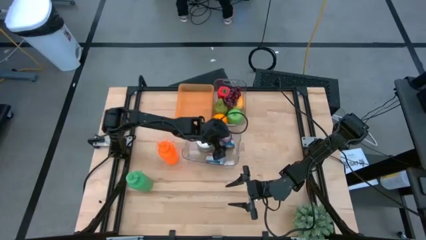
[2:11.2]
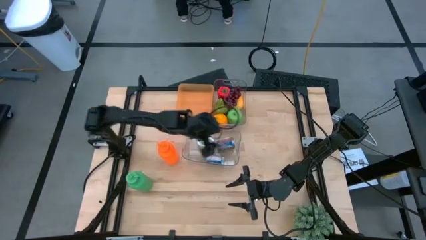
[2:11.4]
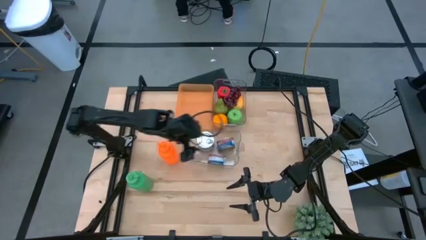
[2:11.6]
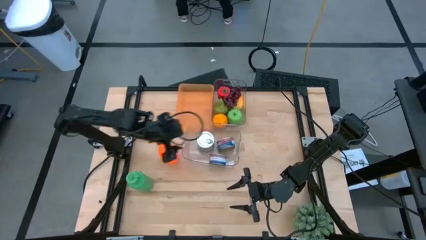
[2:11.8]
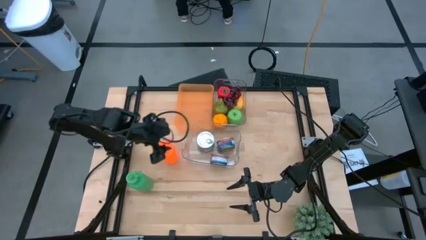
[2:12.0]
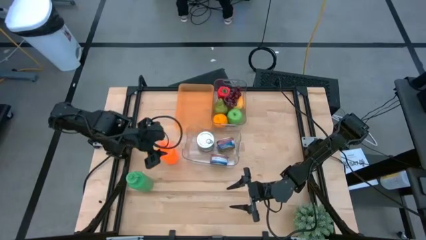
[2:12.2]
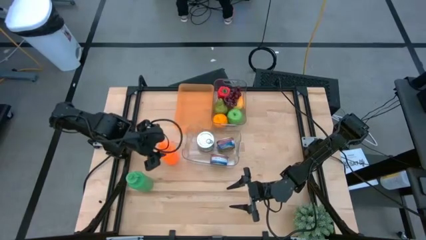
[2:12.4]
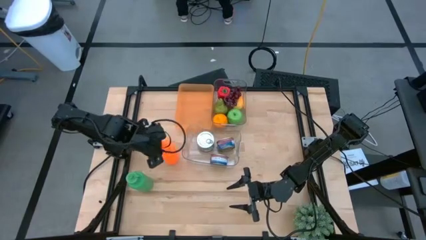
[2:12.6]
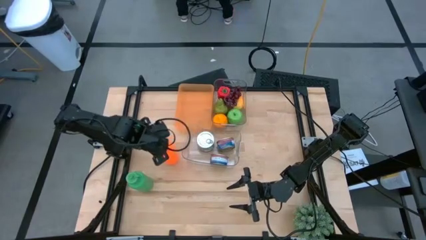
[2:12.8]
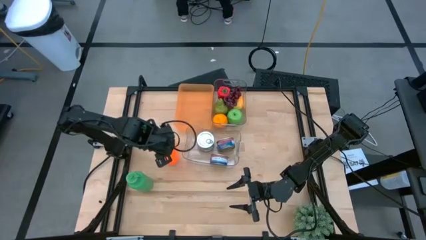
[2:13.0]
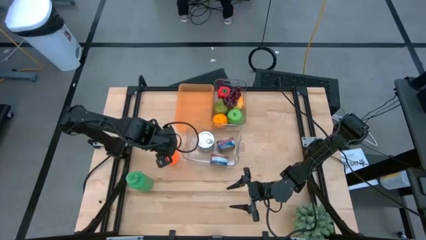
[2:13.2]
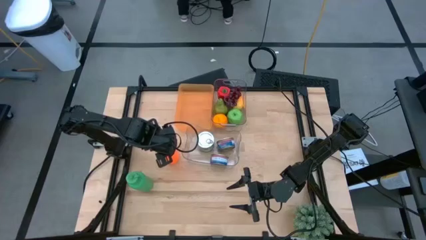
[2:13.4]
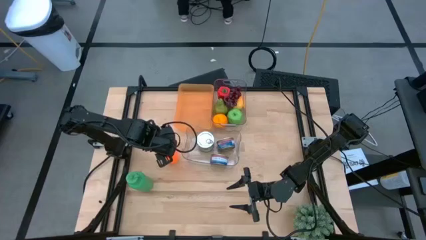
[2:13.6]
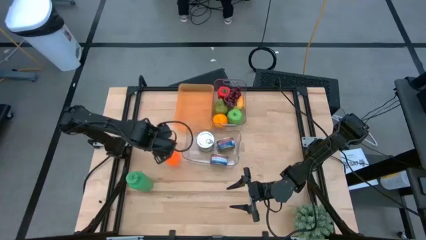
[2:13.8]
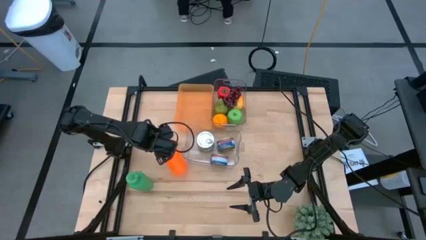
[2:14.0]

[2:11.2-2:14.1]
Task: Pick & Place Food Item
Put the orange water bottle into the orange bin

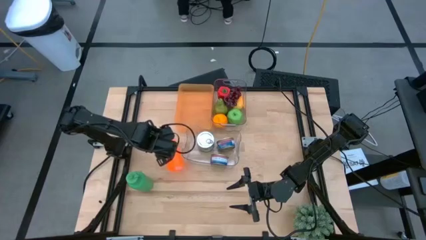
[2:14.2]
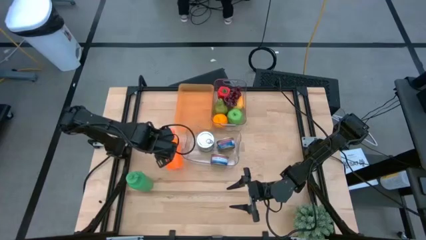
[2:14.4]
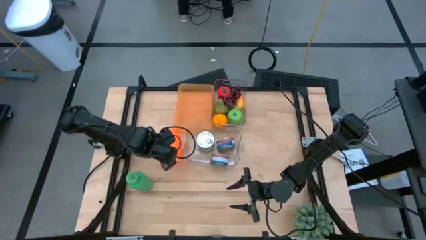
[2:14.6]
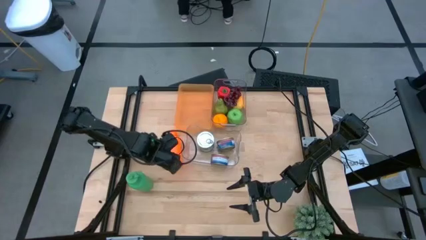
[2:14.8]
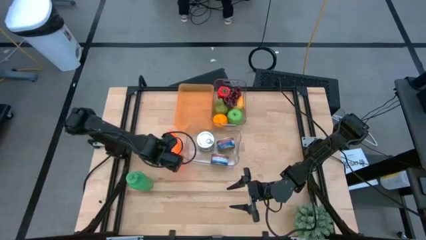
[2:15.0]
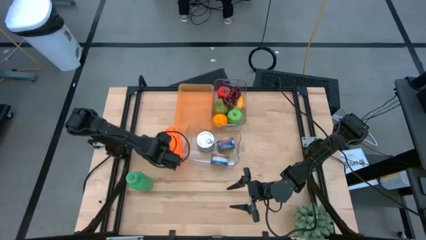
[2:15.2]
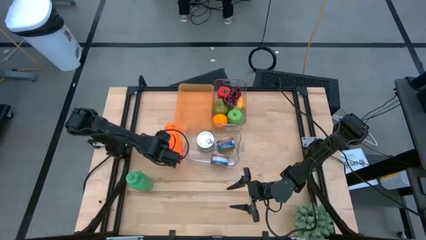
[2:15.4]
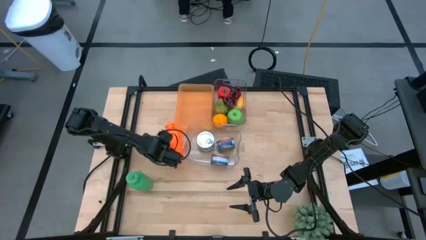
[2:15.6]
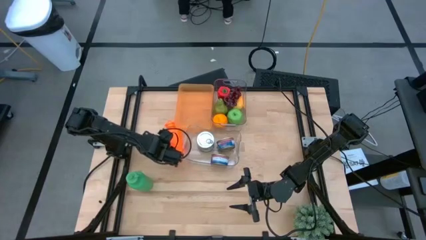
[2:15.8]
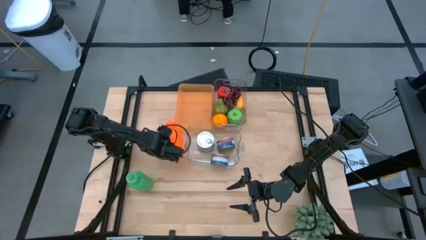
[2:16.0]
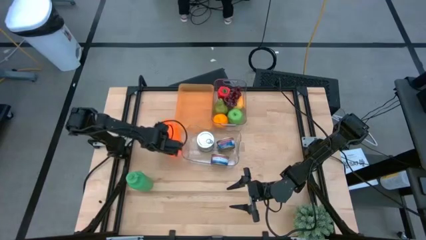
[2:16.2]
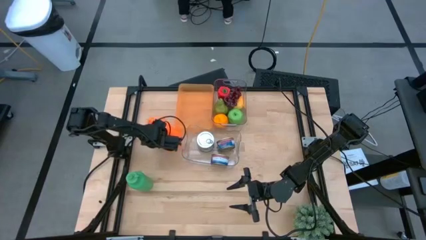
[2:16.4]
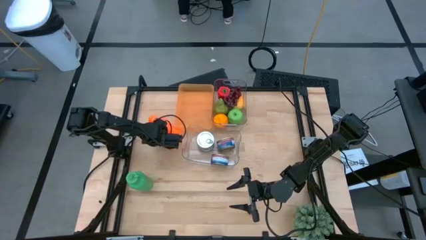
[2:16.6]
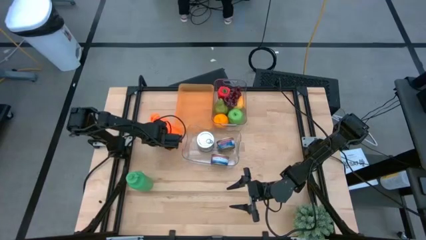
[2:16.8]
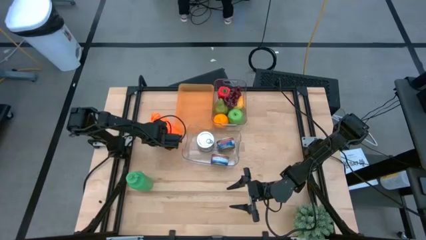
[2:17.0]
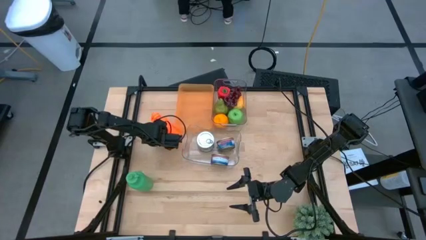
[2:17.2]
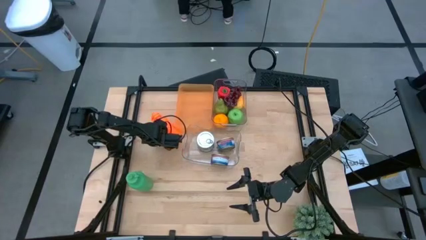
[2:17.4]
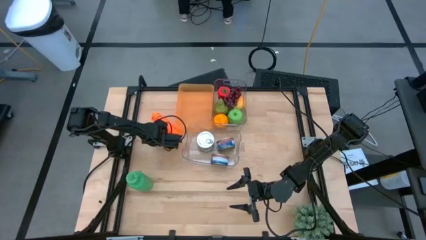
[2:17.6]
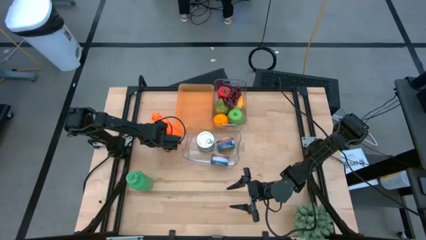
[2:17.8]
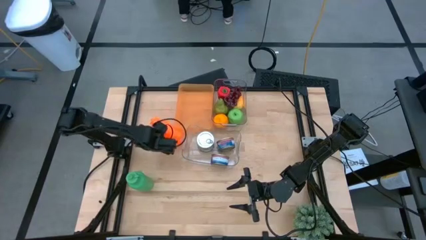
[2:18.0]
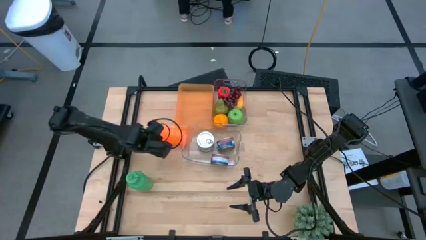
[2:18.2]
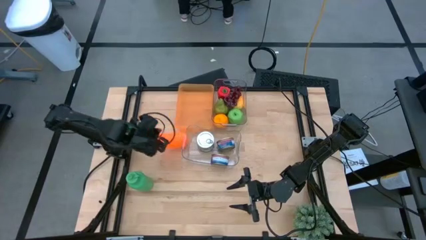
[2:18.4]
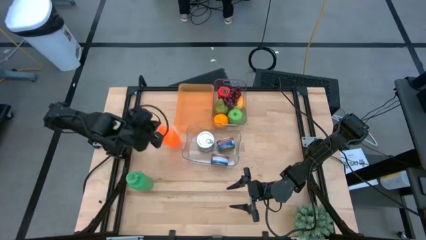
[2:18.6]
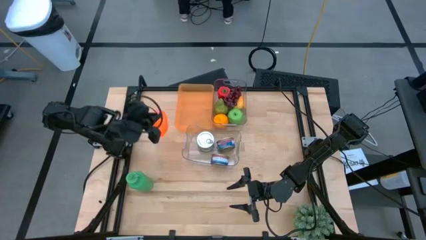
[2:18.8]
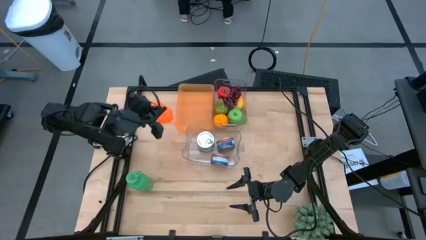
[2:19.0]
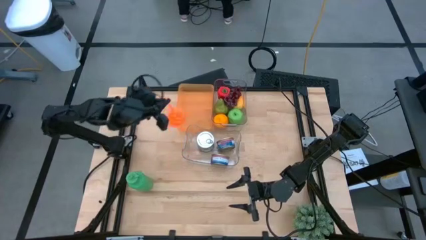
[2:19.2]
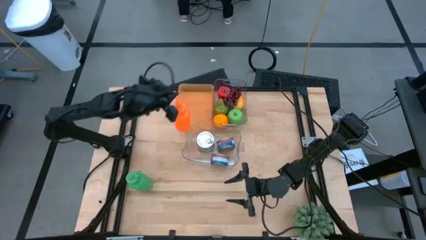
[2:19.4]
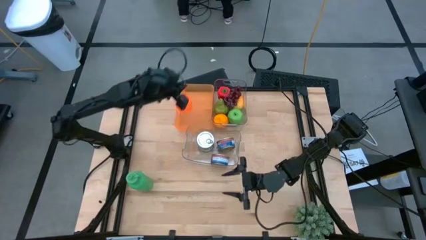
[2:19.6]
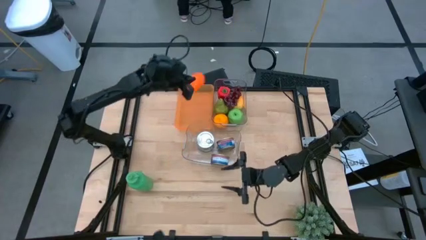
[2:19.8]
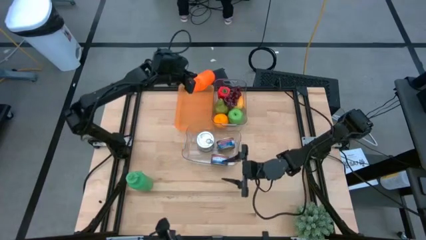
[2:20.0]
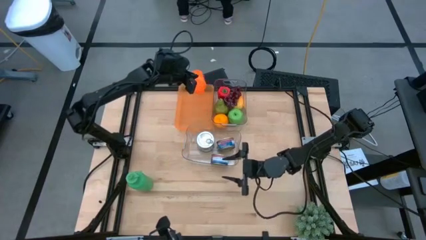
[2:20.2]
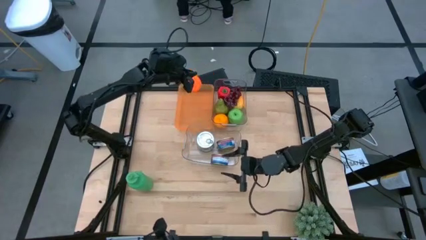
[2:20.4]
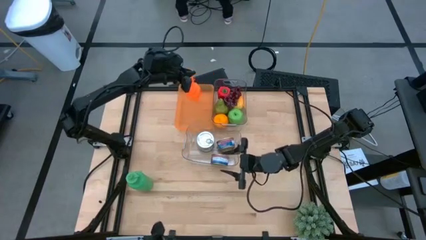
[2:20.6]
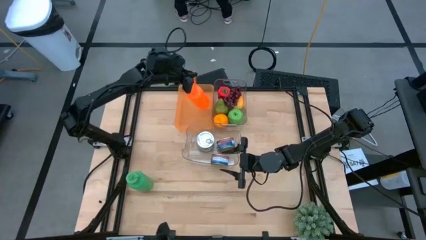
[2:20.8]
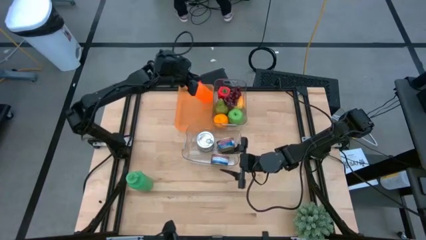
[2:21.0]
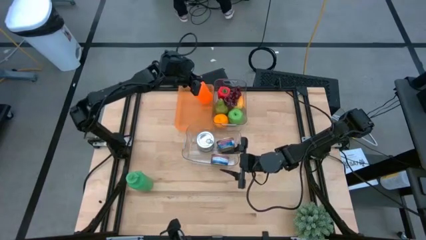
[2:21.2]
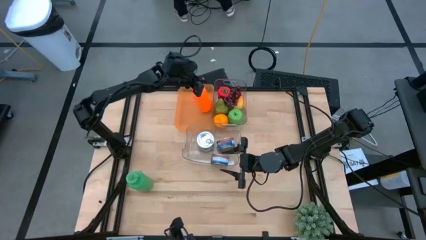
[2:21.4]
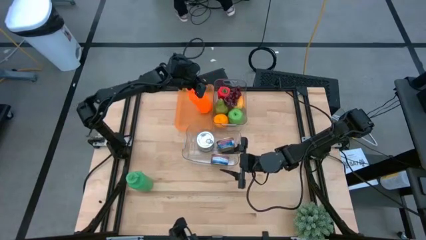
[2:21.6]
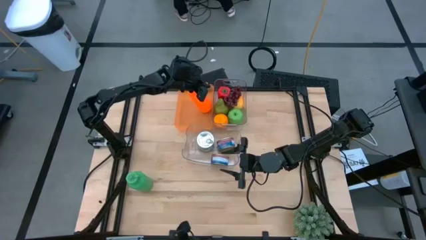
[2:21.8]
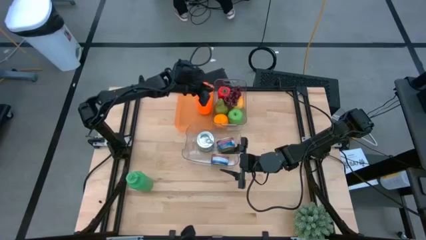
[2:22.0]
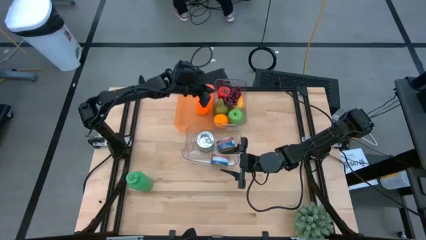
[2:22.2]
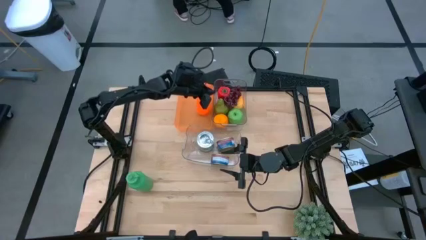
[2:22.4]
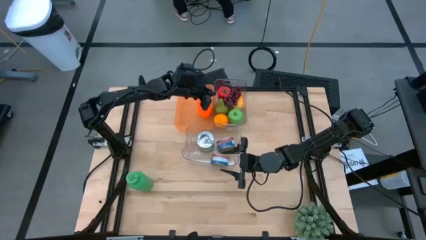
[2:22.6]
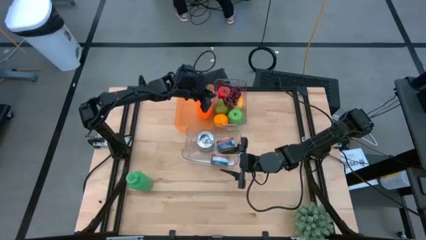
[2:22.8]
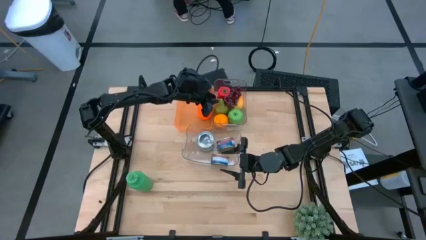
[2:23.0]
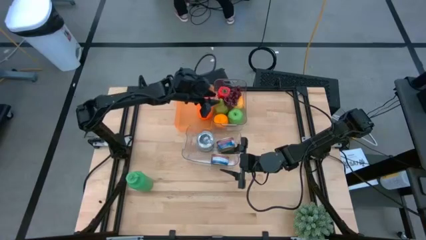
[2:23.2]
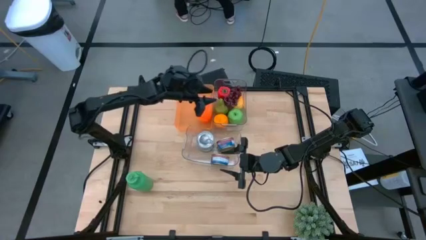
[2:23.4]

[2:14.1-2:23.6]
Put the orange water bottle into the orange bin

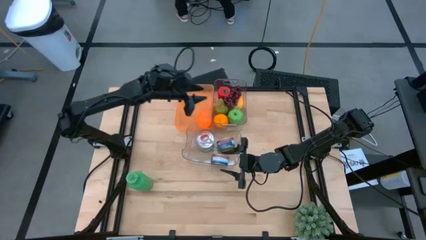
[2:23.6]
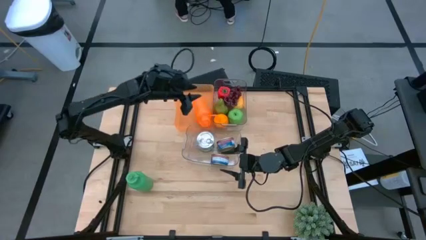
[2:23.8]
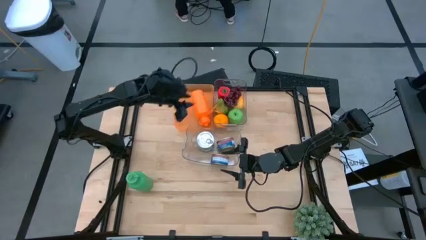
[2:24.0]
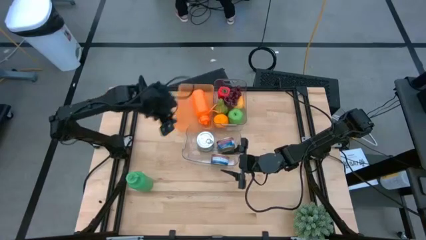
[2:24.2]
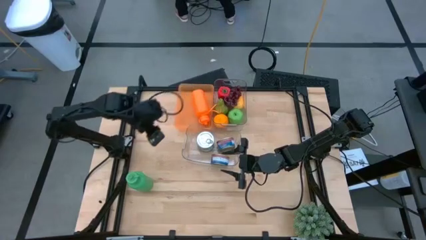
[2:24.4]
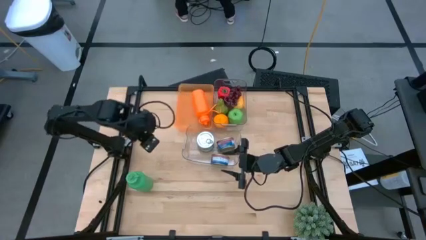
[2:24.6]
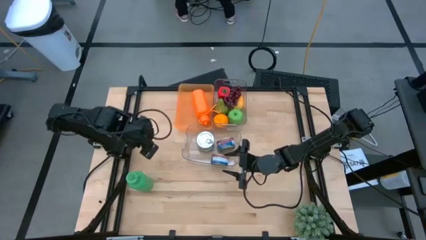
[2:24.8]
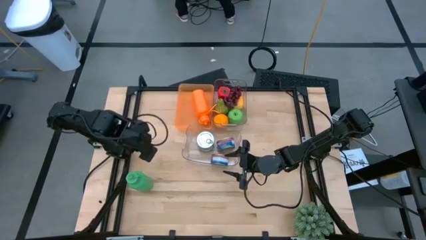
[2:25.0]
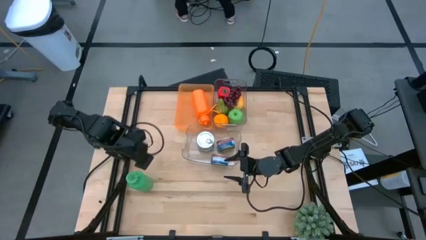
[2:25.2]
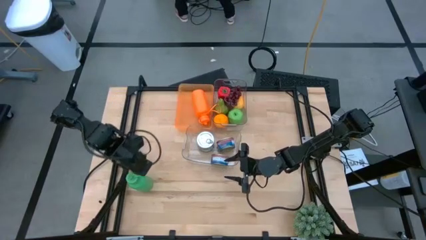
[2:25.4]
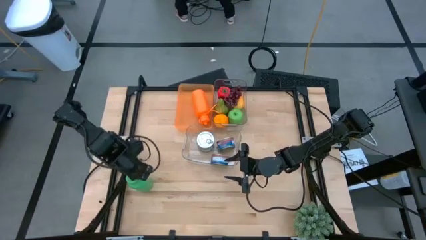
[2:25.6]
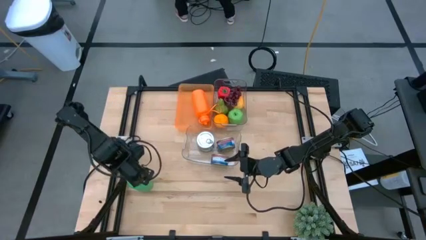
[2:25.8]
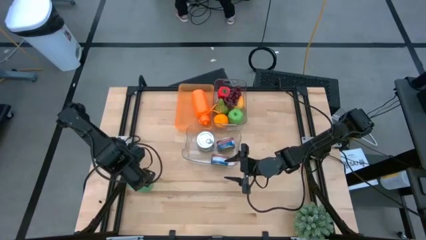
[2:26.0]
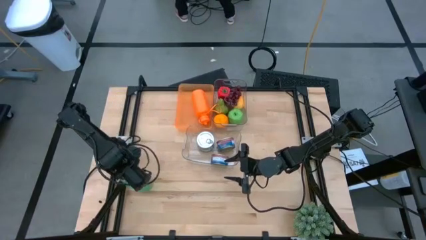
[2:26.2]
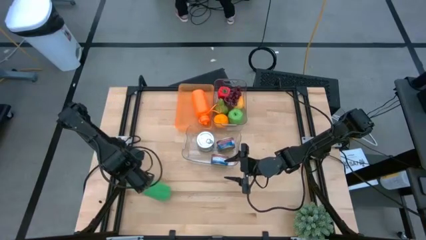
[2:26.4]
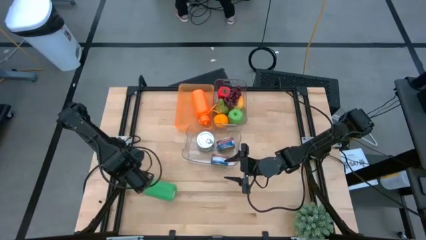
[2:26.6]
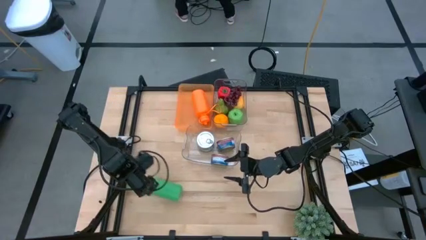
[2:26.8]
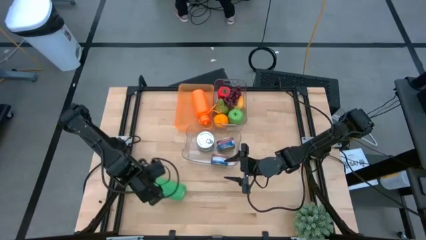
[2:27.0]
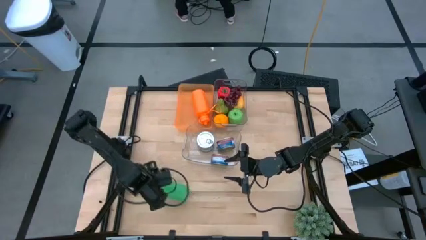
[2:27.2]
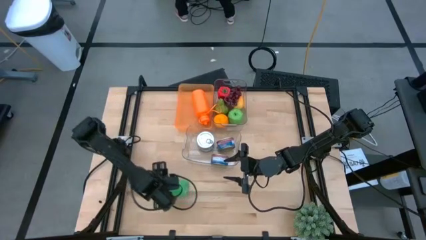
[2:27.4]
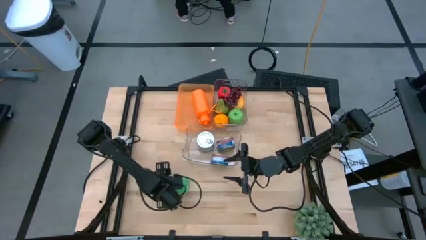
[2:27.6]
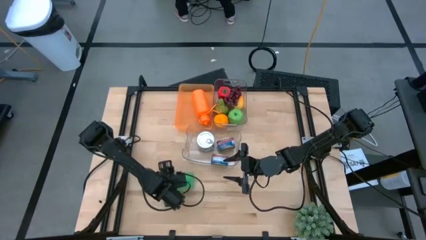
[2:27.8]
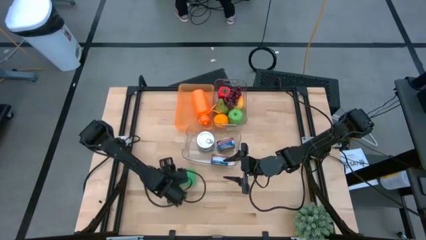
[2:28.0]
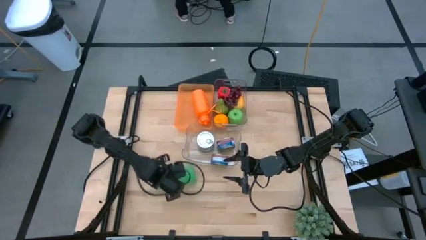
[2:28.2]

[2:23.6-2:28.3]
Put the green water bottle into the orange bin
